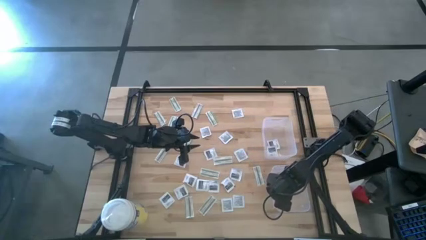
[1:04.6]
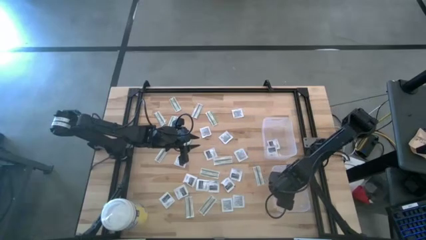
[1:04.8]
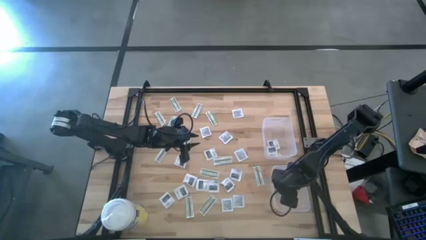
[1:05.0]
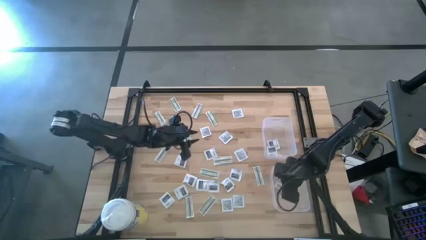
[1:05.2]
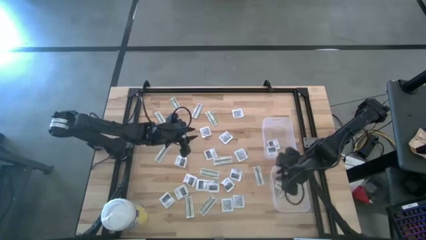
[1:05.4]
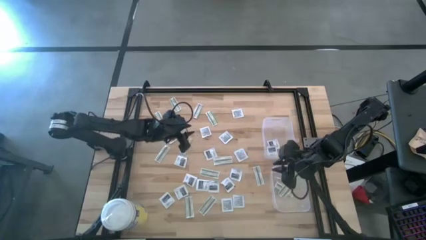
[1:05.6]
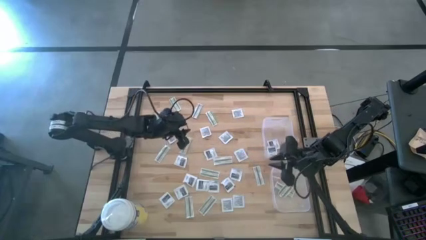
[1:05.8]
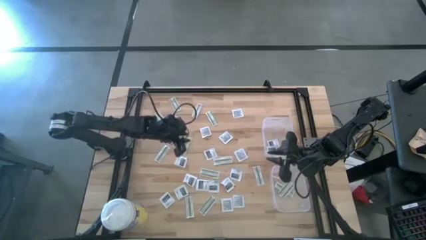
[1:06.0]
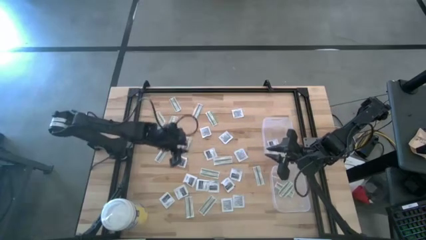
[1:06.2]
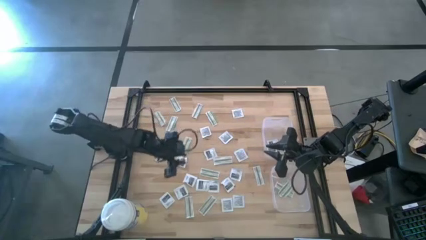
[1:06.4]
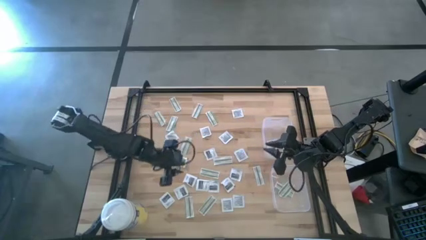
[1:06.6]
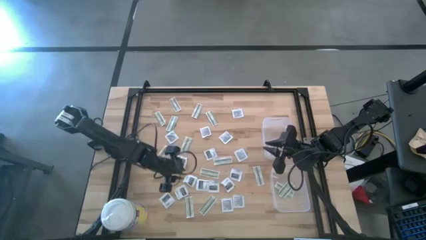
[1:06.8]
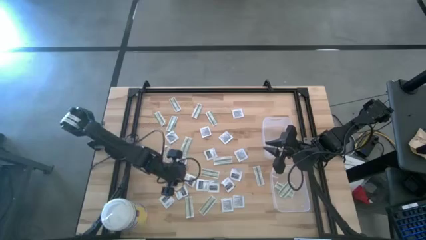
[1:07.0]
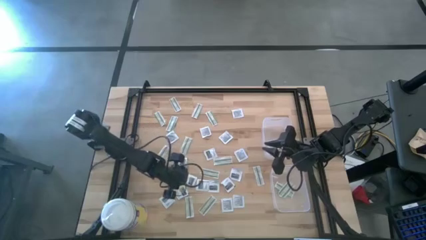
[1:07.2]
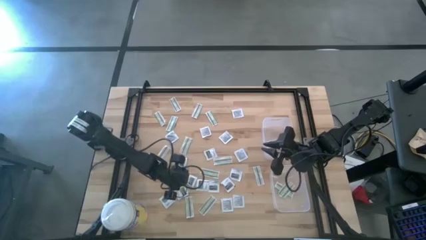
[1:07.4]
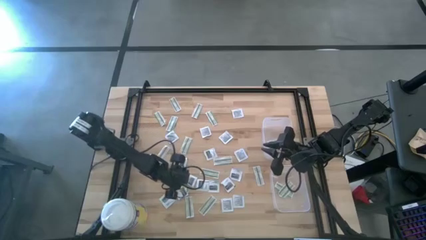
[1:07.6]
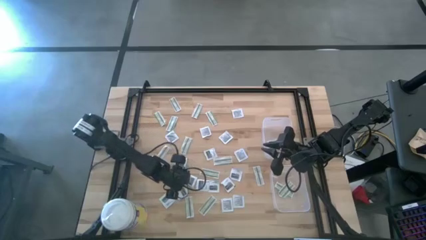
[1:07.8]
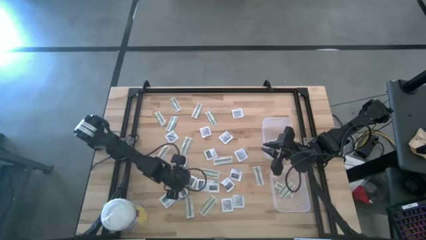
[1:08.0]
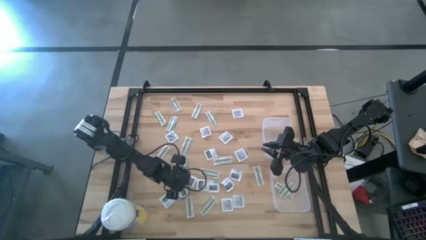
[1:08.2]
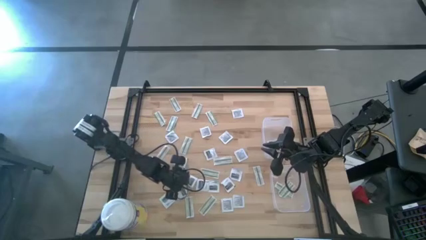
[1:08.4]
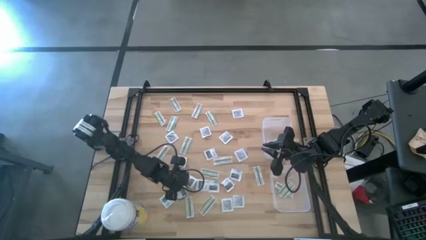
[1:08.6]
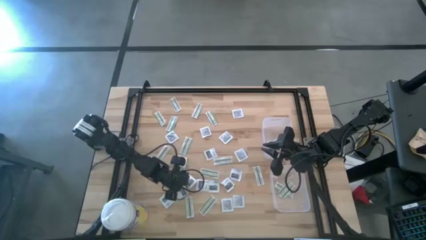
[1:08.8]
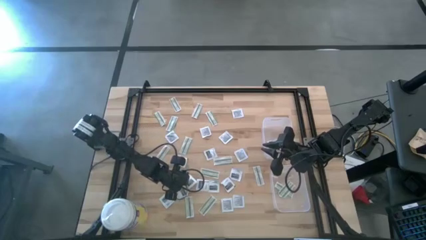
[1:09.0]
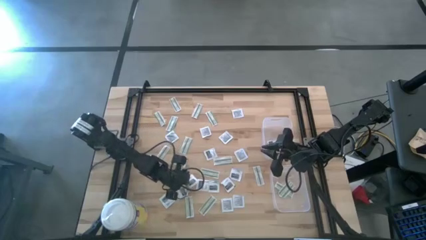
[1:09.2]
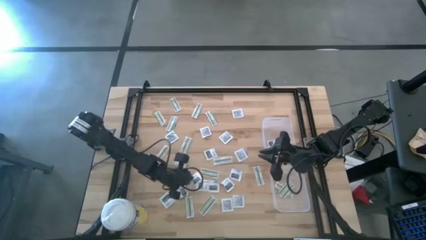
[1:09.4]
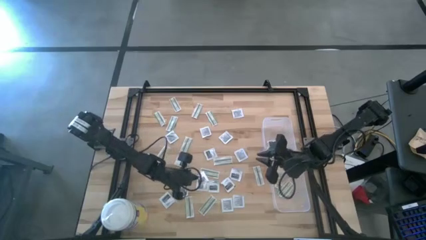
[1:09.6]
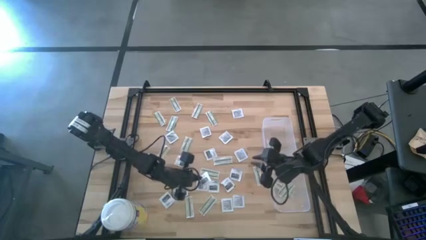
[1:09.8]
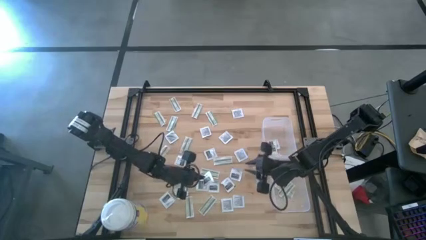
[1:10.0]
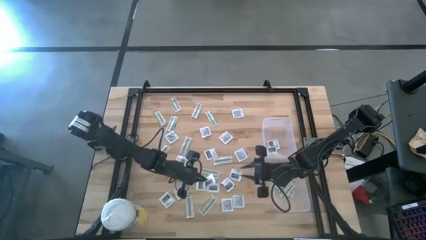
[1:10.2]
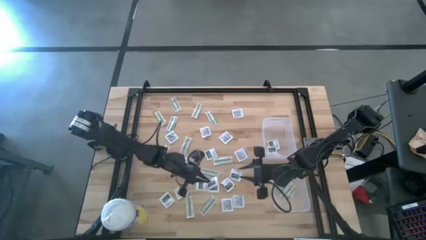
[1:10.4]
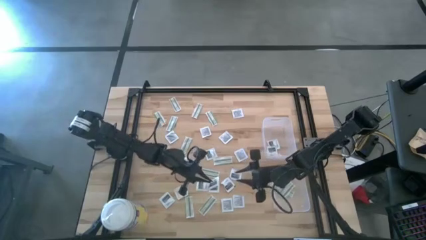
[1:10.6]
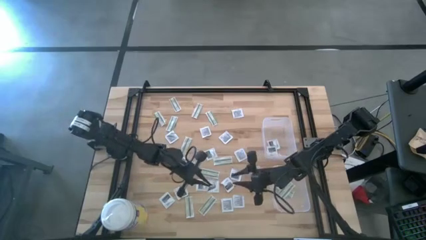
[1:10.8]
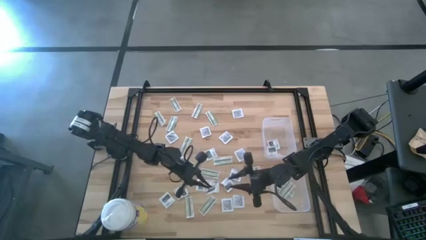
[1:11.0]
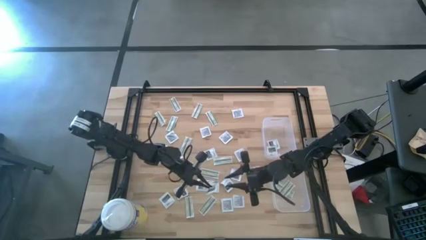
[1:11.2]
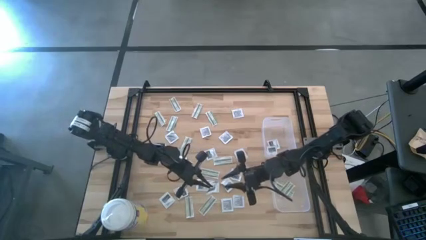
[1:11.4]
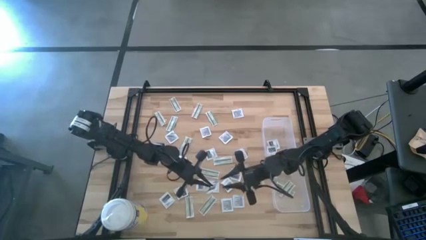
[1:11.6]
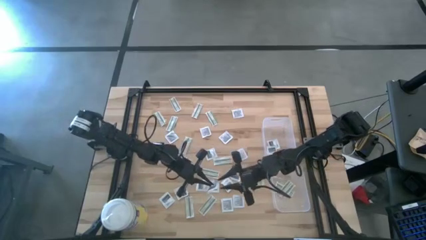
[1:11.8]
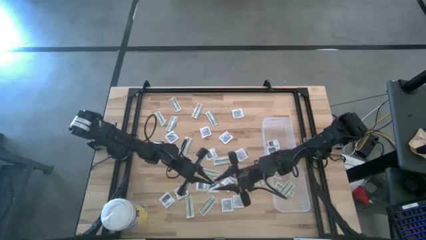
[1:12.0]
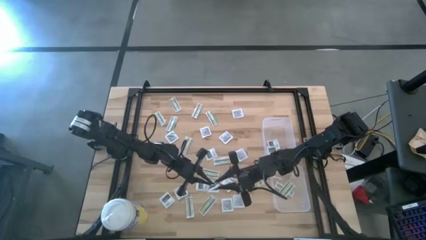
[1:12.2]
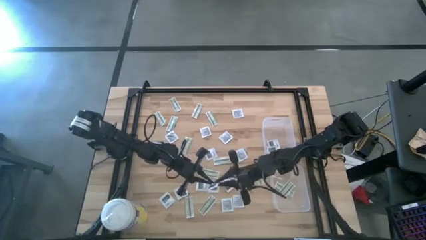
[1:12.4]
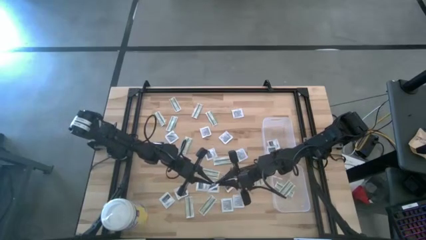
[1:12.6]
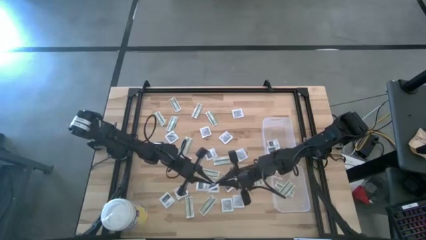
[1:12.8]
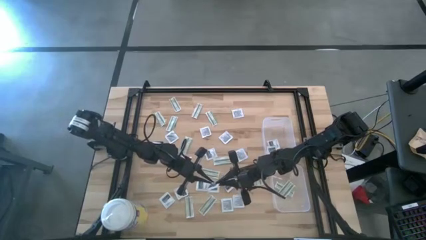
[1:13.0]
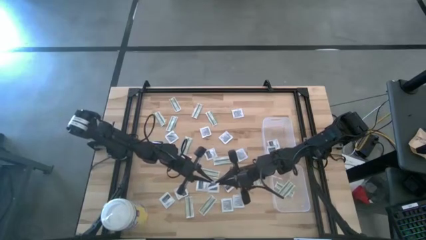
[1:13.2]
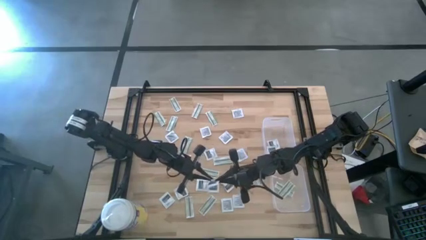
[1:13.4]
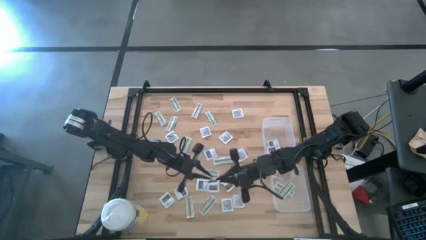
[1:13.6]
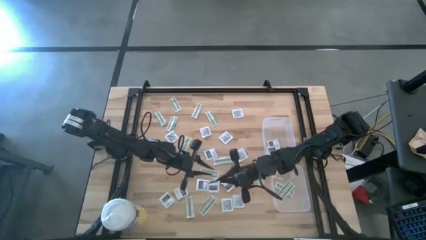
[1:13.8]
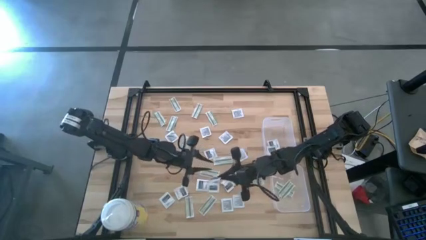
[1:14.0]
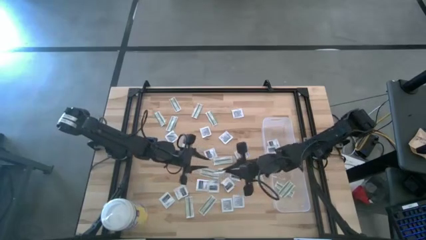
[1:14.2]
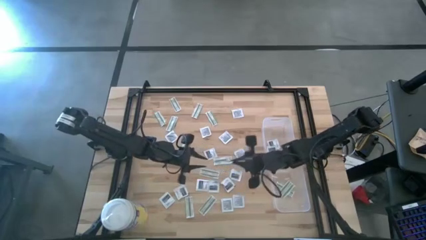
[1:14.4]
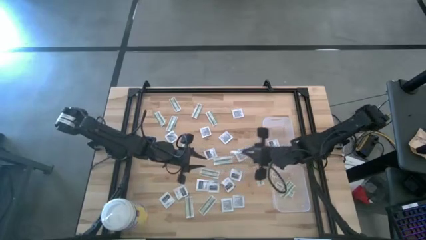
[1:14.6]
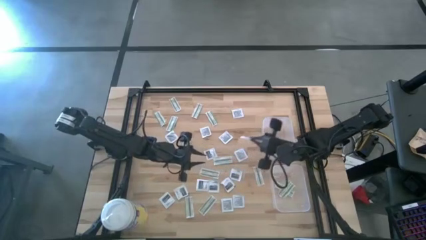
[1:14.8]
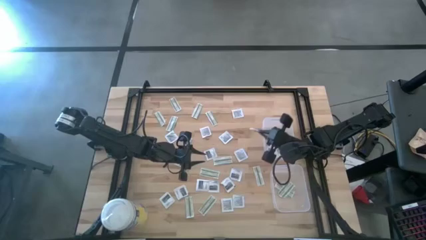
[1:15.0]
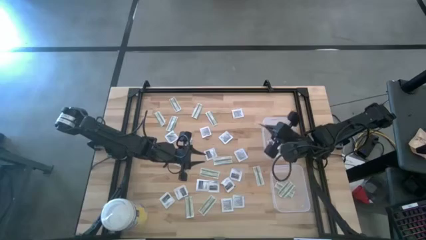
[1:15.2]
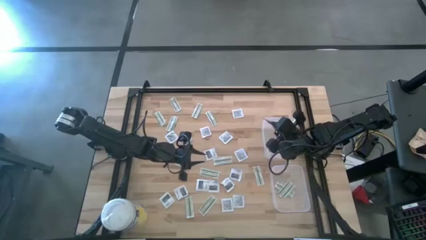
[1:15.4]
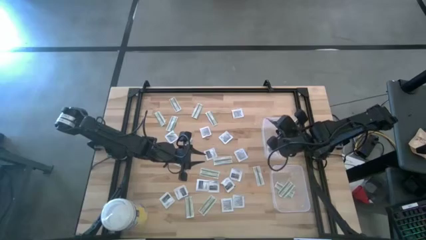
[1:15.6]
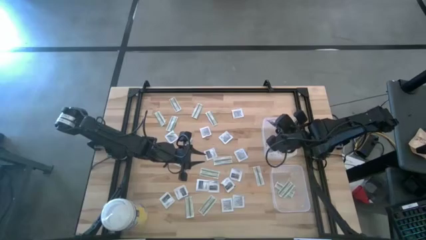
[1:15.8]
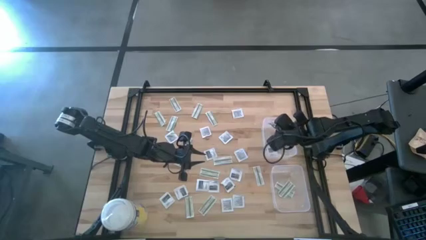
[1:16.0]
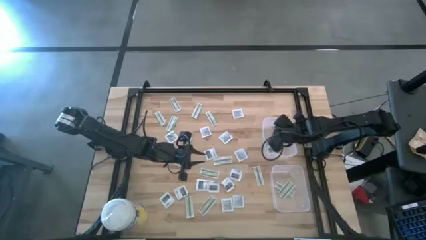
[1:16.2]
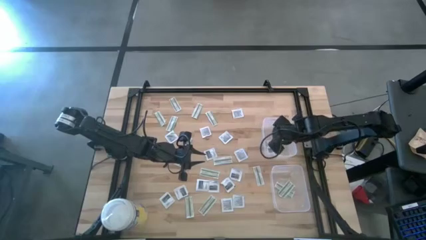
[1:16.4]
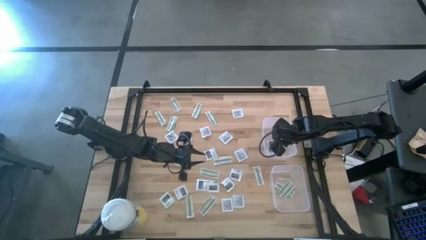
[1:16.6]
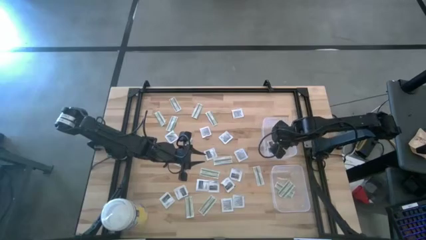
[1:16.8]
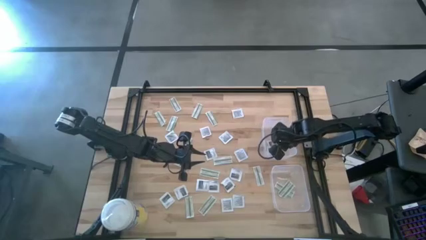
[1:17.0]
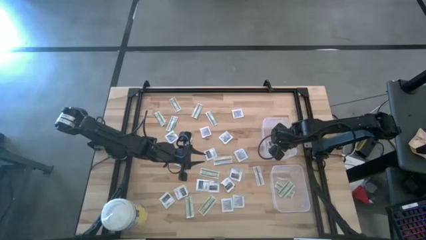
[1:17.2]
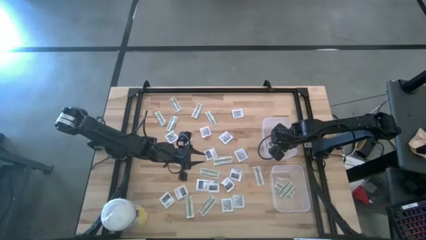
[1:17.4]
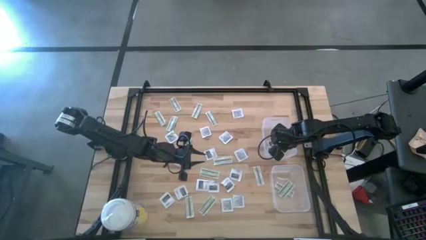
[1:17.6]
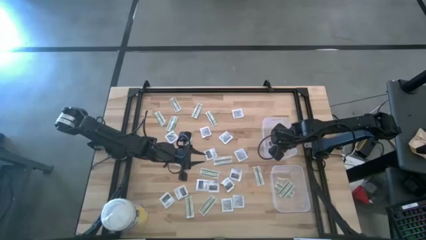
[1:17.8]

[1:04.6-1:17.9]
Task: Pick & Place First Aid Supplies
Put the towelette pack into the top bin

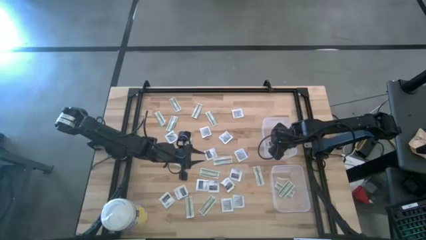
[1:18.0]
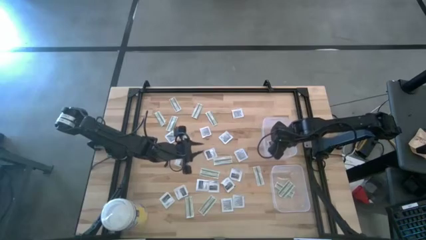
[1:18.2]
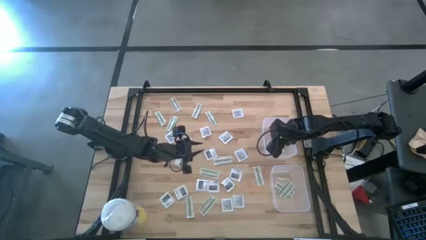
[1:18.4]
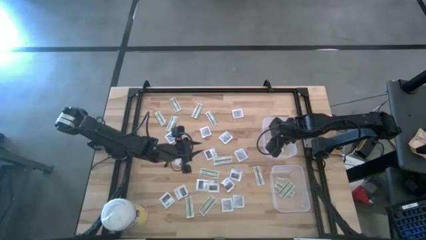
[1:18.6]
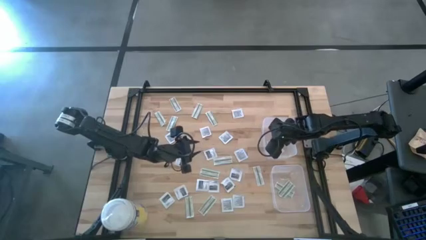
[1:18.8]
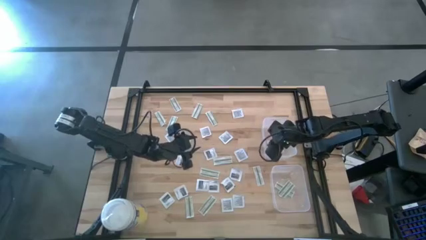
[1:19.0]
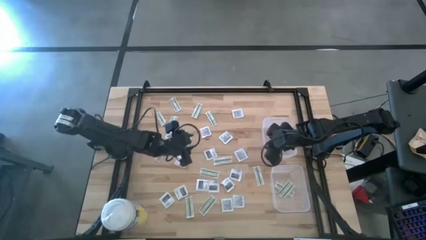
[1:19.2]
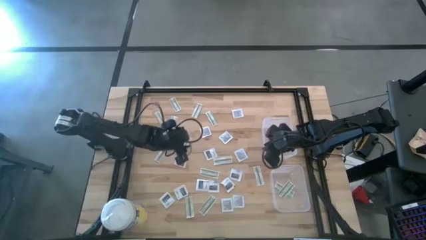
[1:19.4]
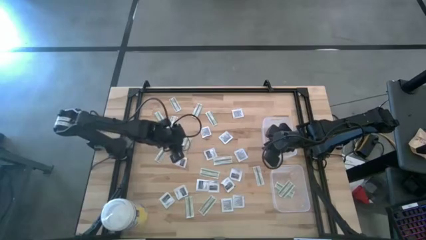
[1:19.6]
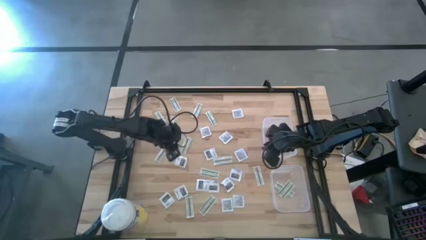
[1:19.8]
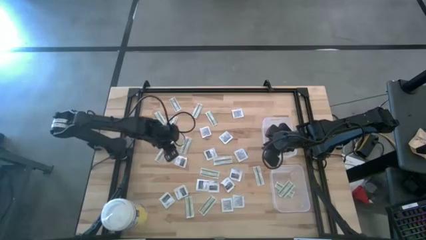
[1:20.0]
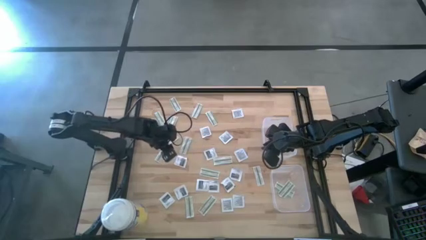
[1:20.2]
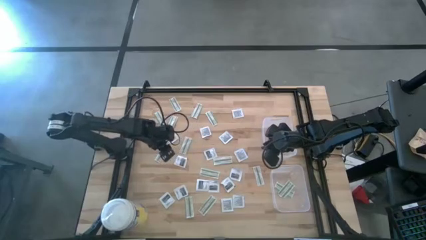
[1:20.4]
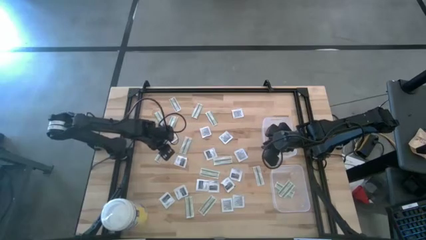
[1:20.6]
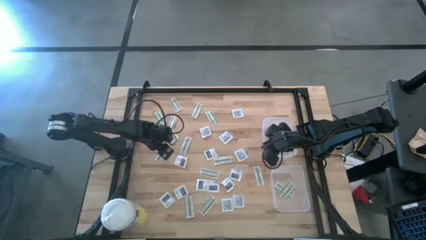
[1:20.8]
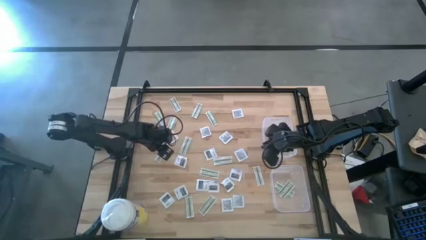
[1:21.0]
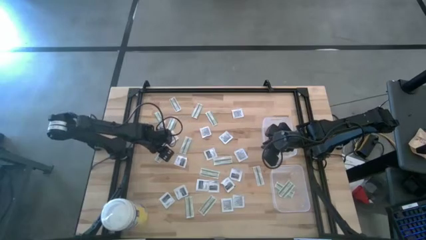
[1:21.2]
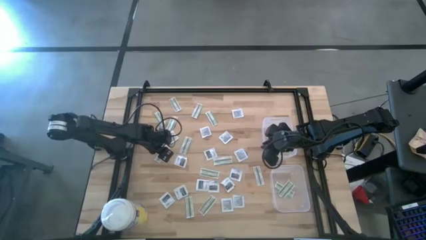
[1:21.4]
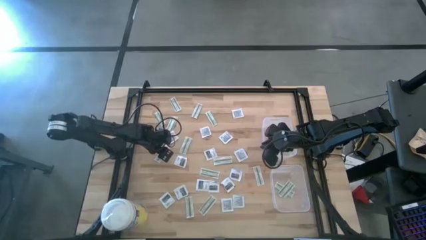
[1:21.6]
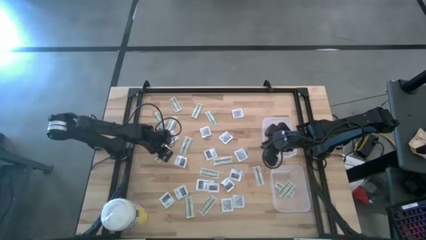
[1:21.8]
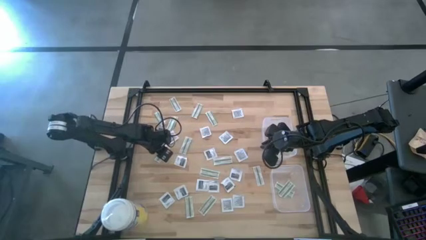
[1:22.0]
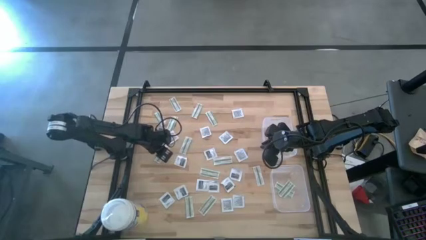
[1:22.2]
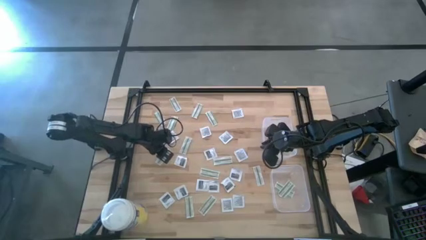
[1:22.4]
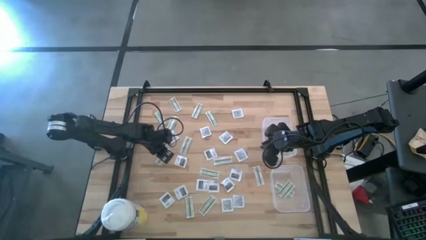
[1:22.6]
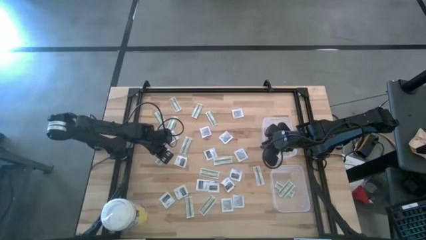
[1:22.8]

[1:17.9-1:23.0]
Put the bandage pack into the bottom bin
